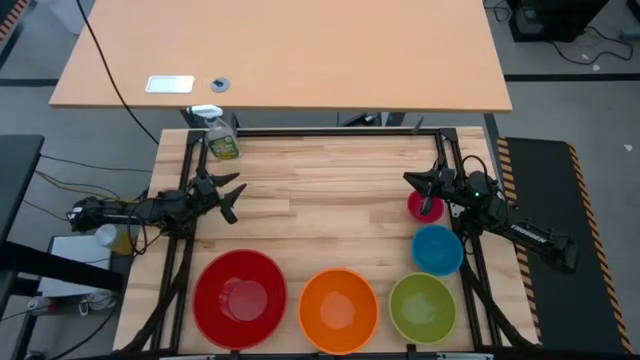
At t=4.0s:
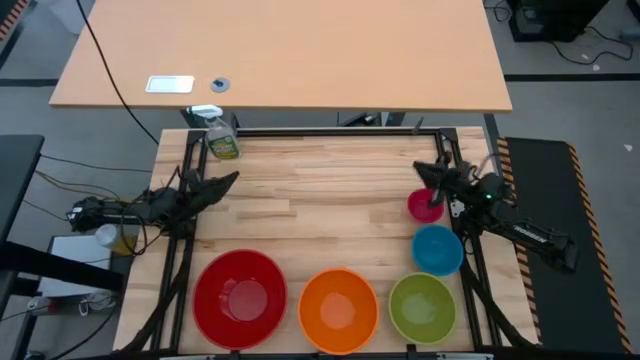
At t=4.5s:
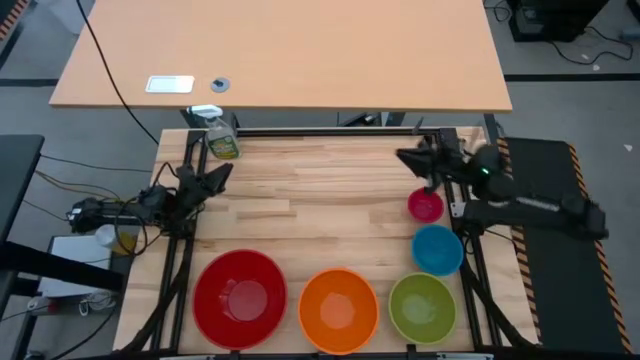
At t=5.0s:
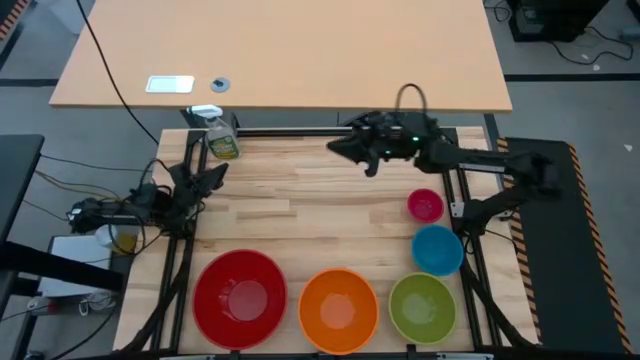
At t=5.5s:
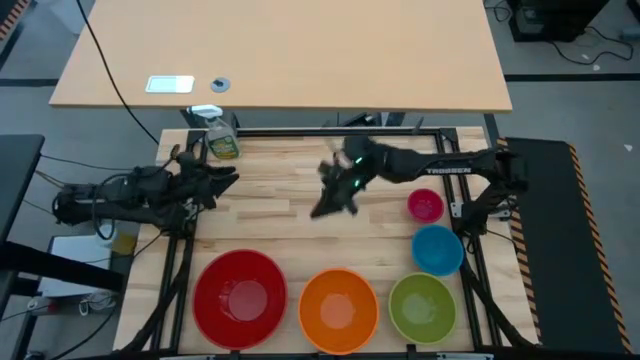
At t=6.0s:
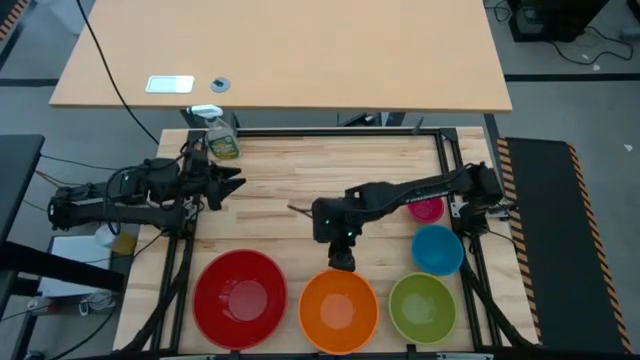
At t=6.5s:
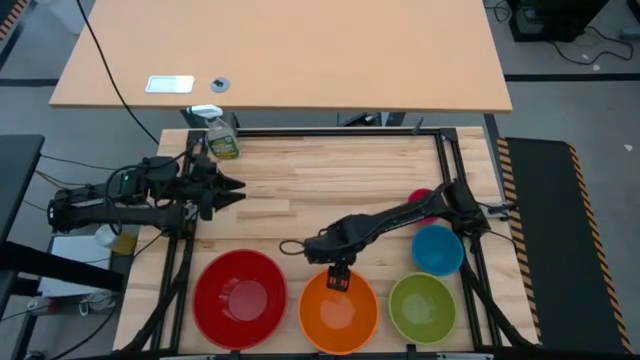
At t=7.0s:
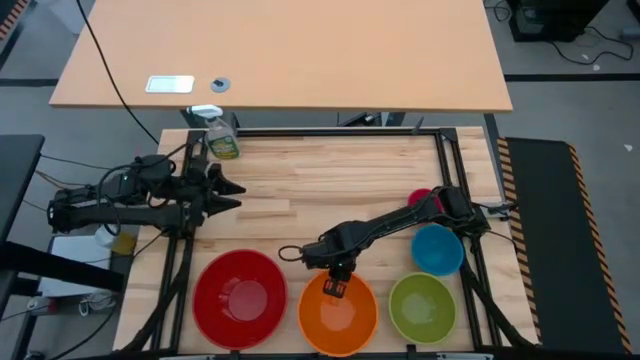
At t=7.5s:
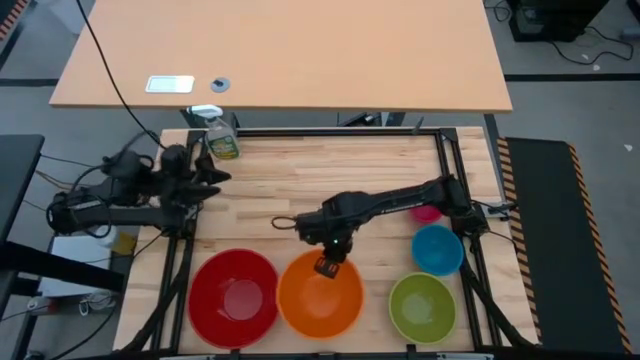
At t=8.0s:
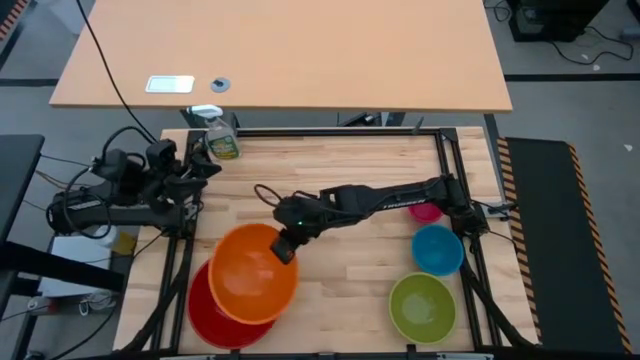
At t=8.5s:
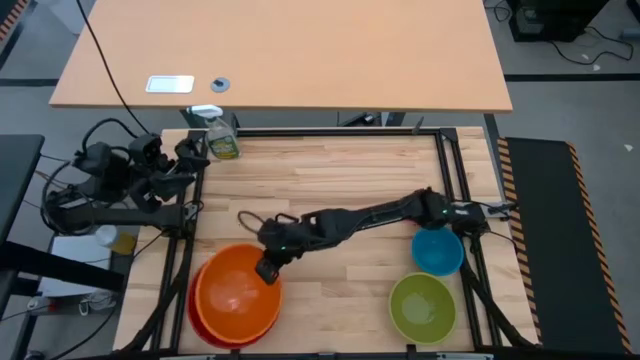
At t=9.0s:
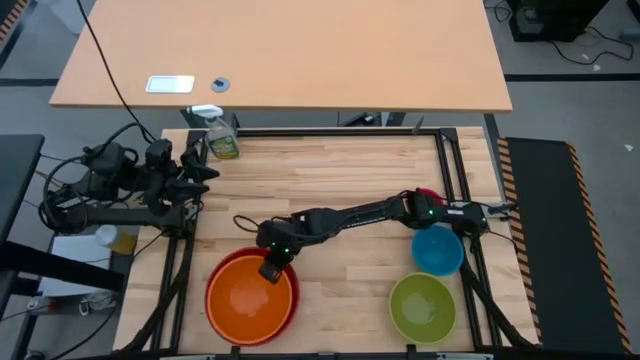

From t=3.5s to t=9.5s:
Stack the orange bowl on top of the red bowl

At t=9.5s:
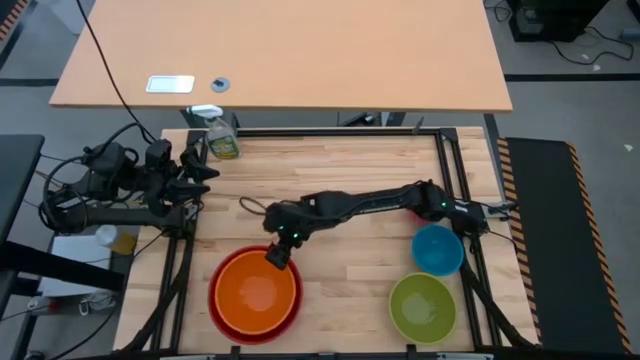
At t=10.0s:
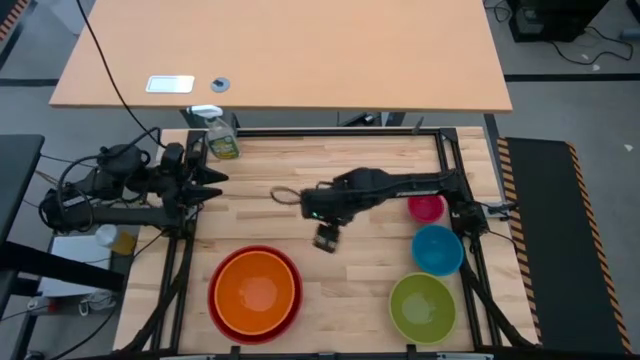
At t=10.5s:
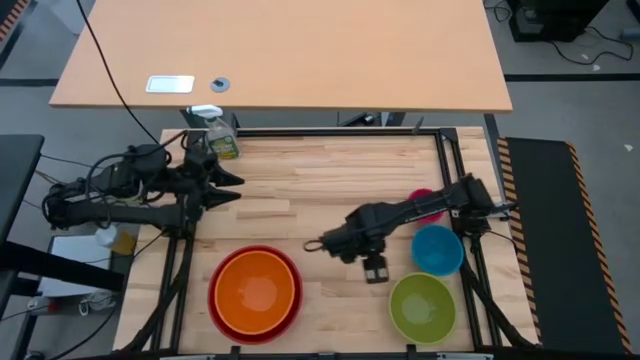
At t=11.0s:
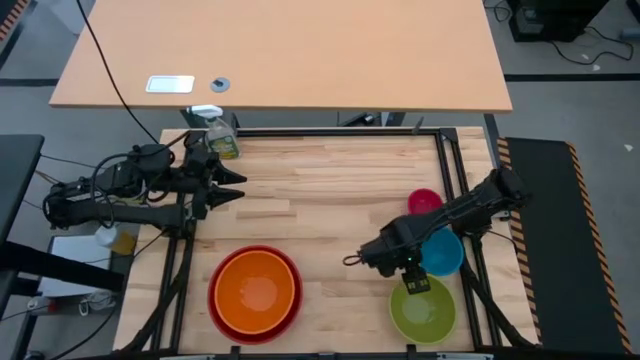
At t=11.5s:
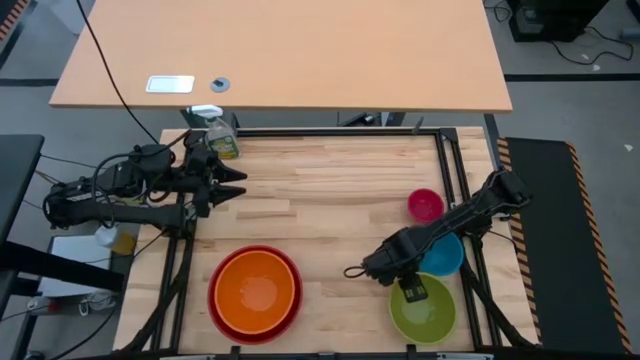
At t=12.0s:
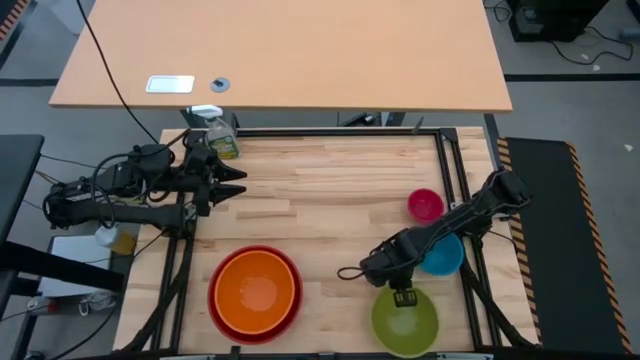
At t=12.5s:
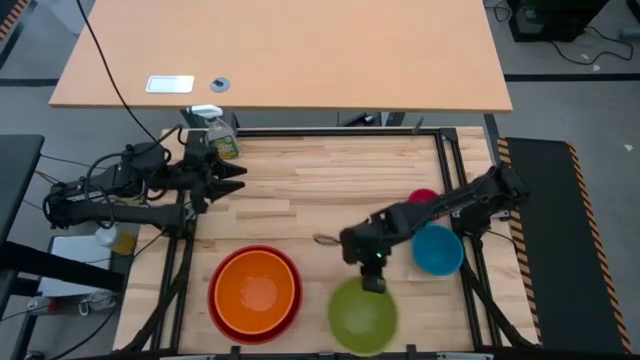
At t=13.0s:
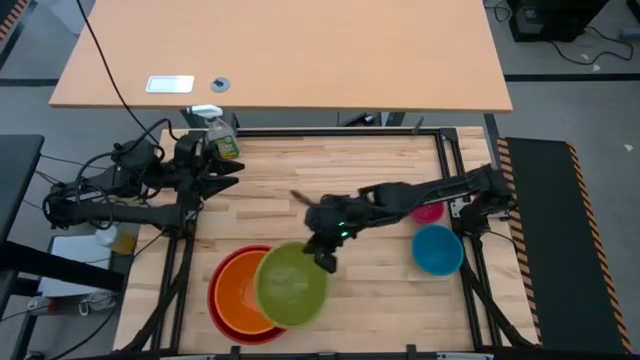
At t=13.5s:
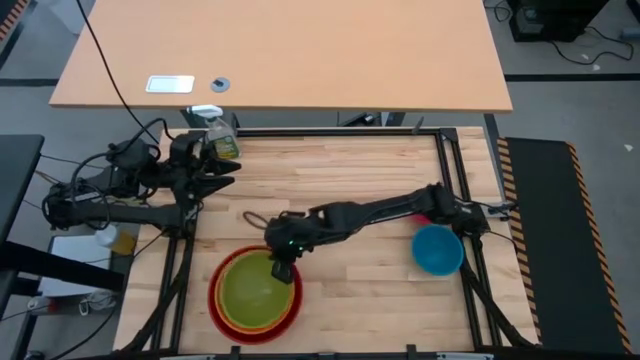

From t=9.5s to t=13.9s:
Stack the green bowl on top of the orange bowl

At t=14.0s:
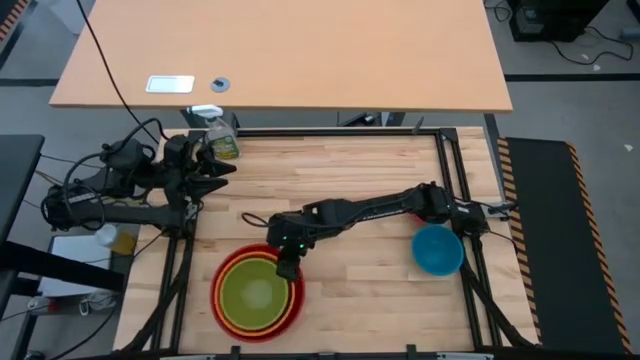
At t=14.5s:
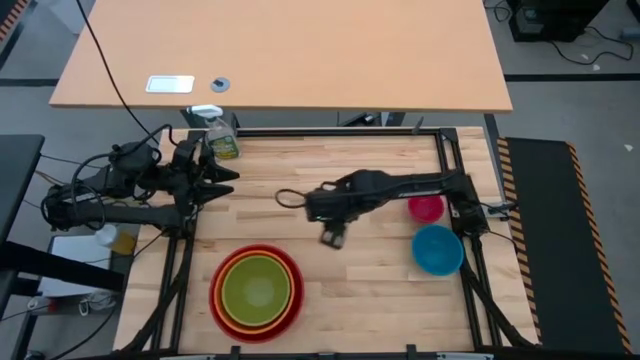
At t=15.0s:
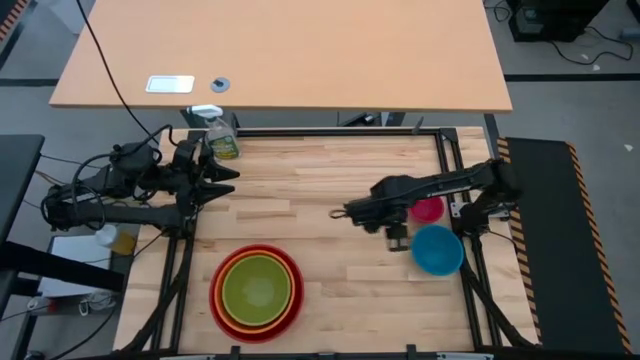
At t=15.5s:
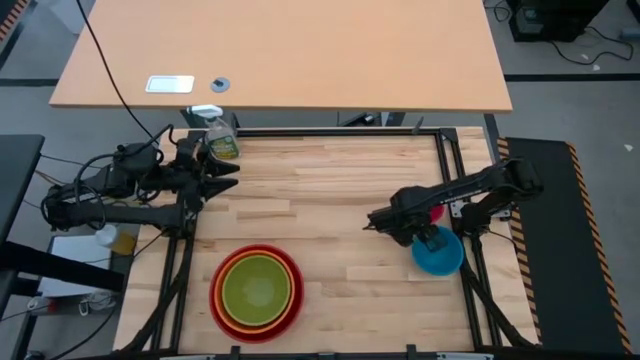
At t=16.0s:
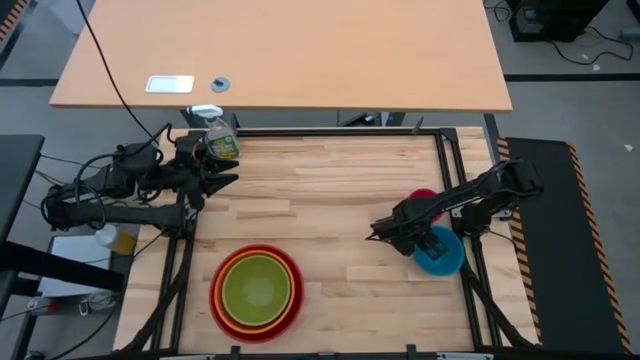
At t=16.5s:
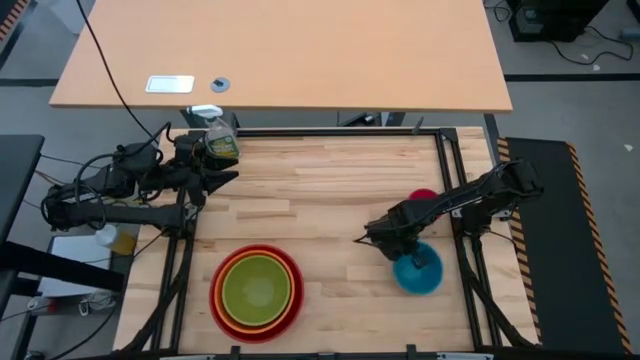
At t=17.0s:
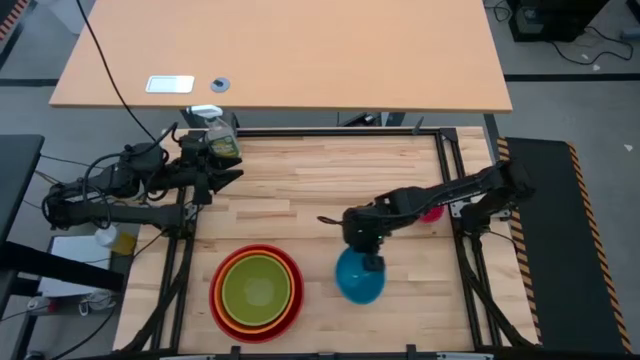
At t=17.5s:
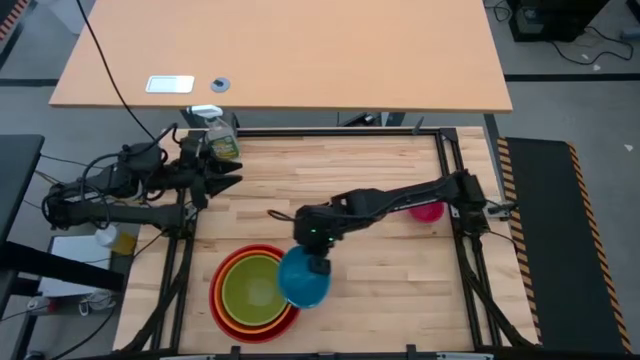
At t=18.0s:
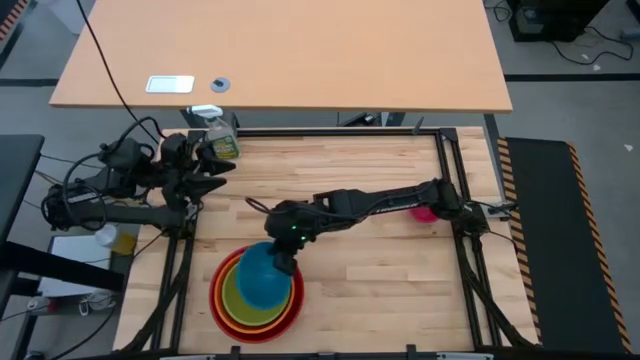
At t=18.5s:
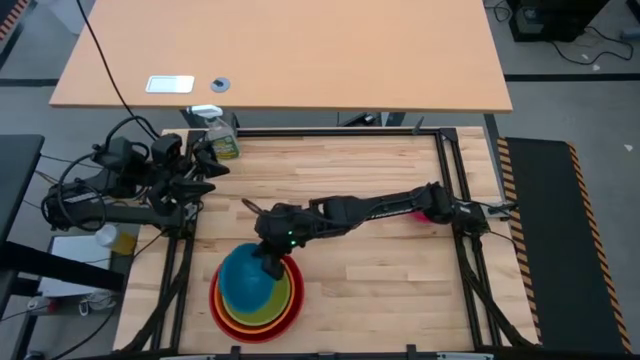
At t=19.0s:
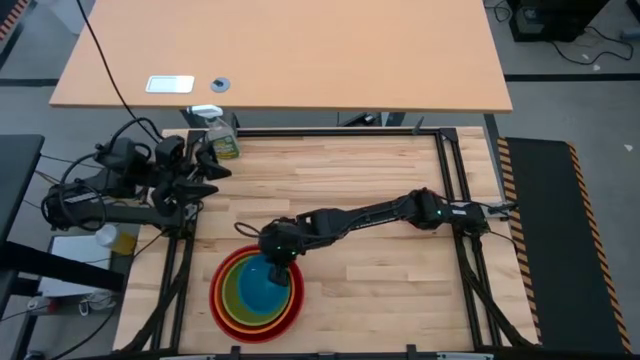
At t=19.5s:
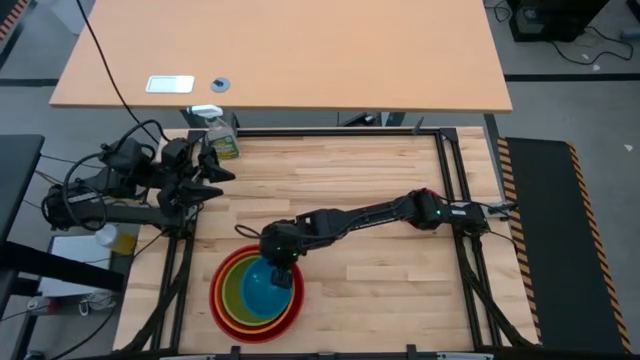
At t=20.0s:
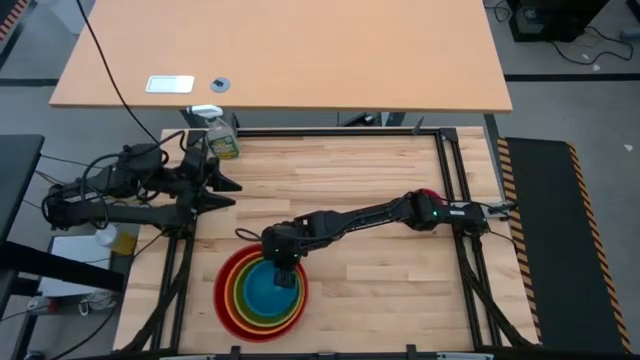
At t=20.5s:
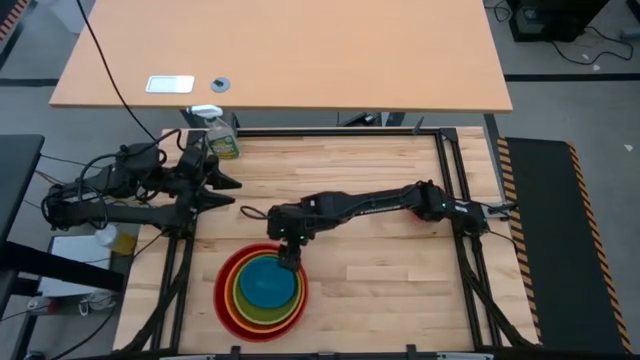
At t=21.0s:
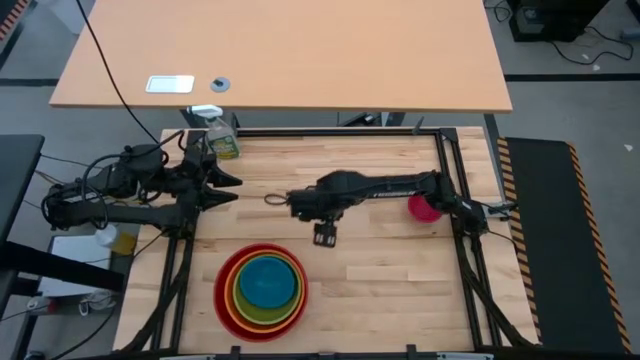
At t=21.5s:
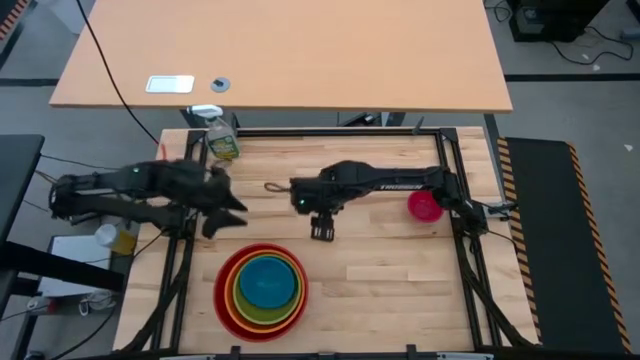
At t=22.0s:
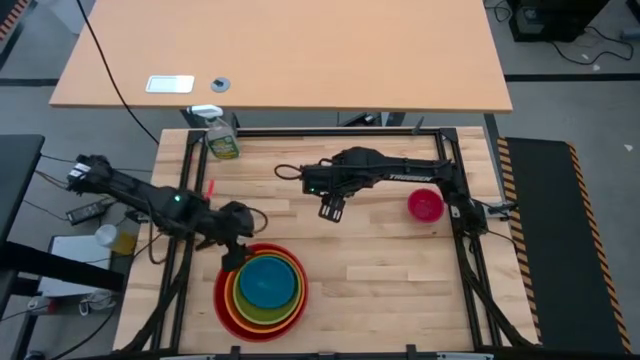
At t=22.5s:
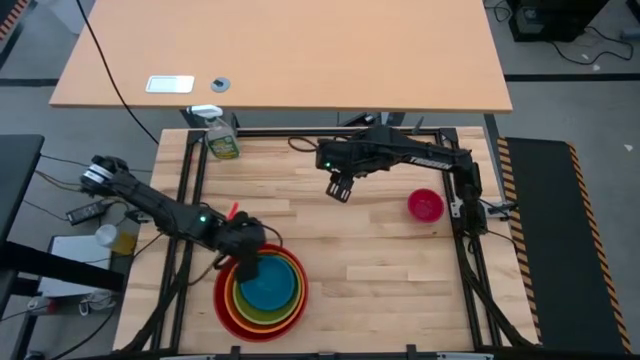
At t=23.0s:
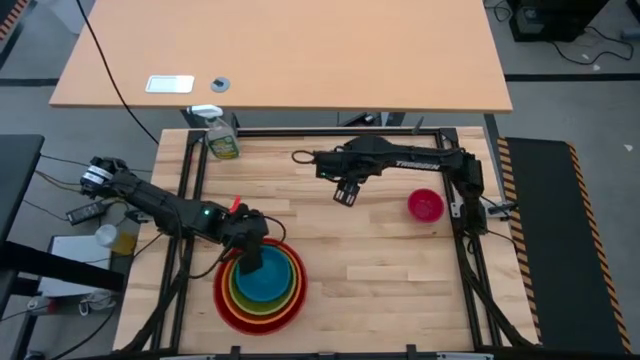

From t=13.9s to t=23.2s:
Stack the blue bowl on top of the green bowl
